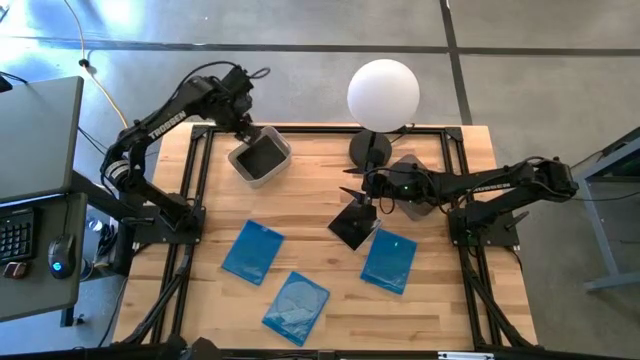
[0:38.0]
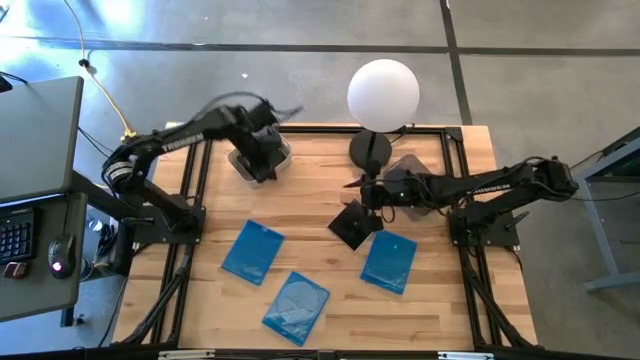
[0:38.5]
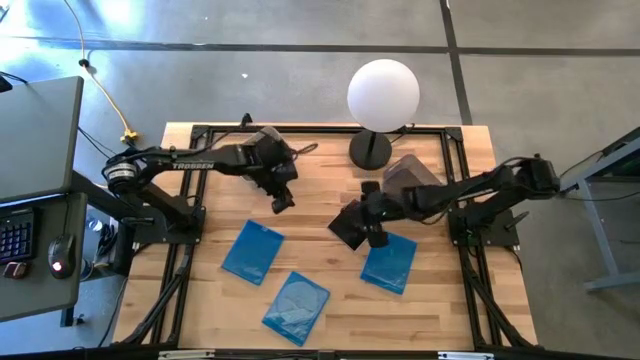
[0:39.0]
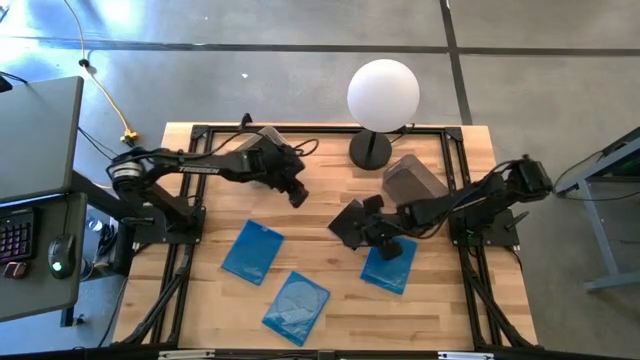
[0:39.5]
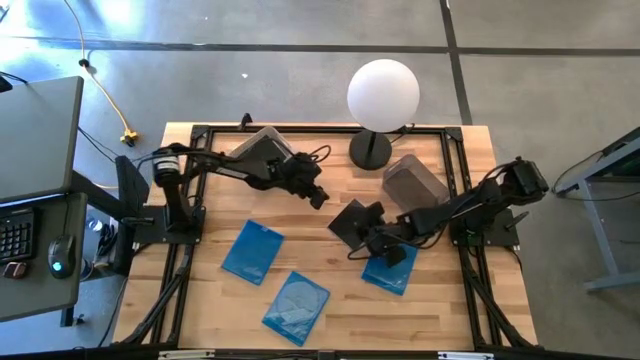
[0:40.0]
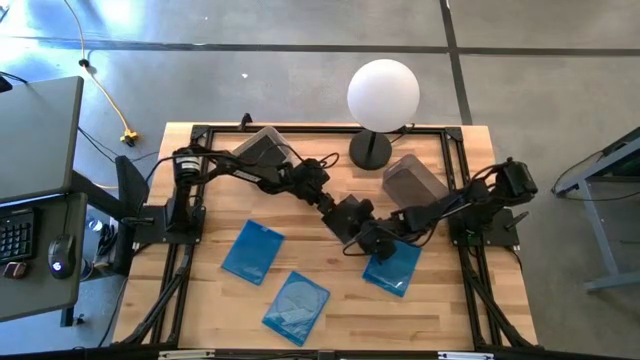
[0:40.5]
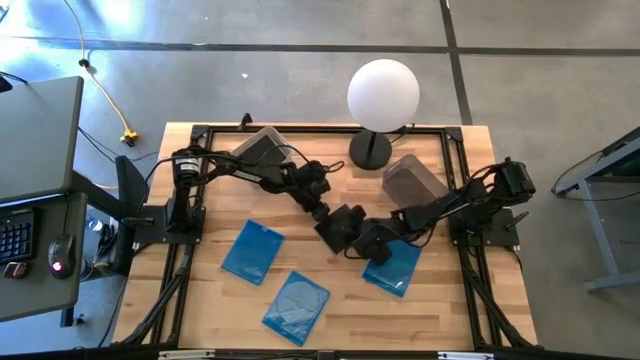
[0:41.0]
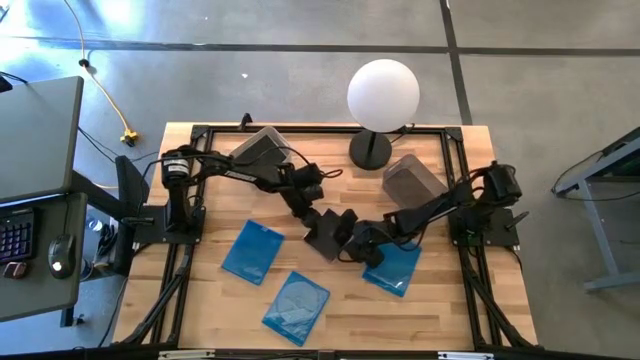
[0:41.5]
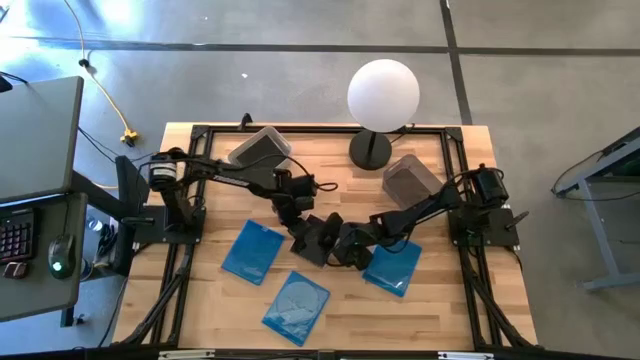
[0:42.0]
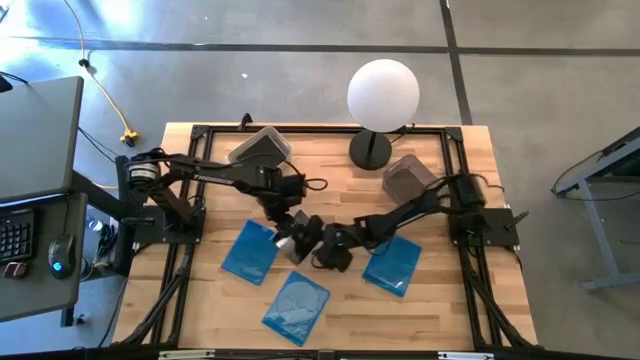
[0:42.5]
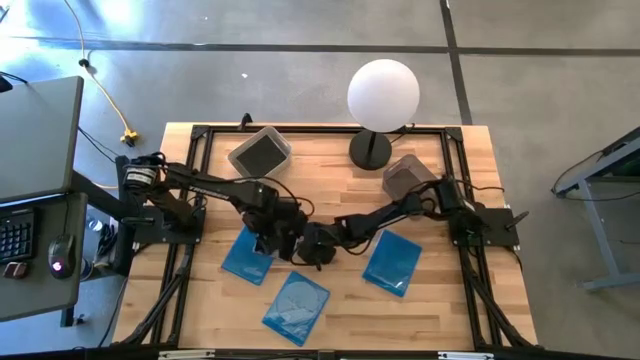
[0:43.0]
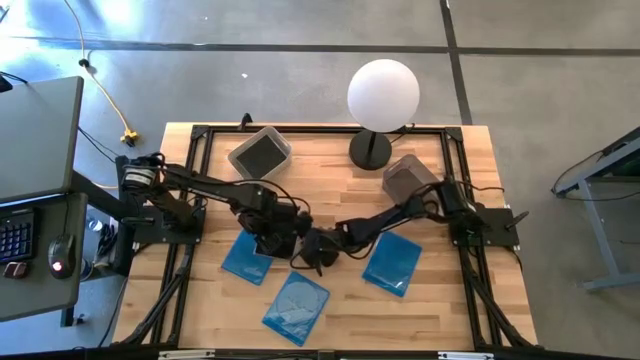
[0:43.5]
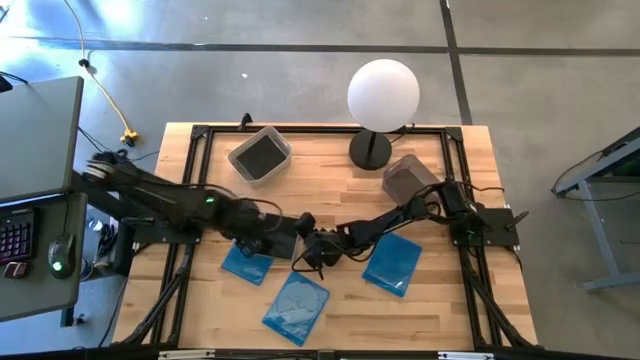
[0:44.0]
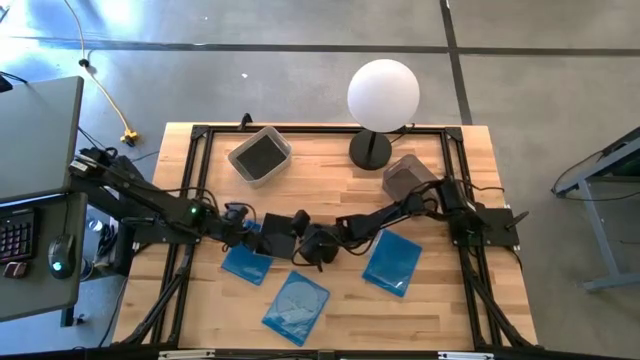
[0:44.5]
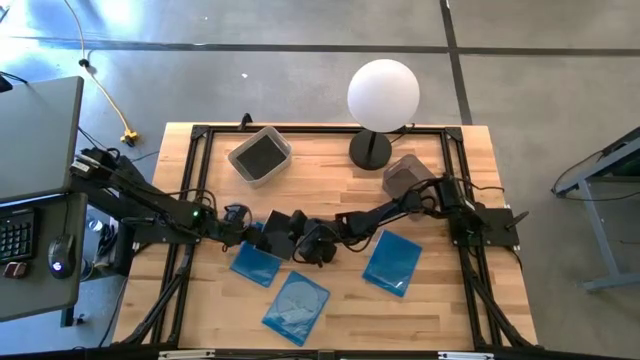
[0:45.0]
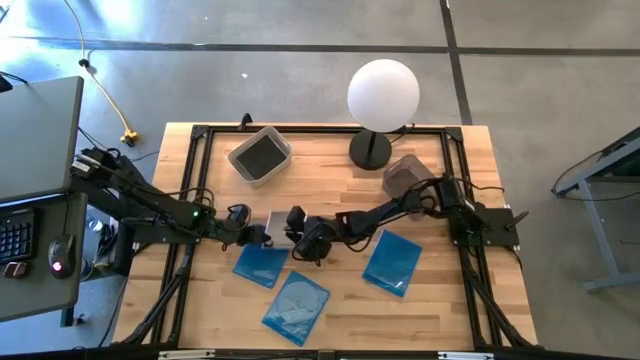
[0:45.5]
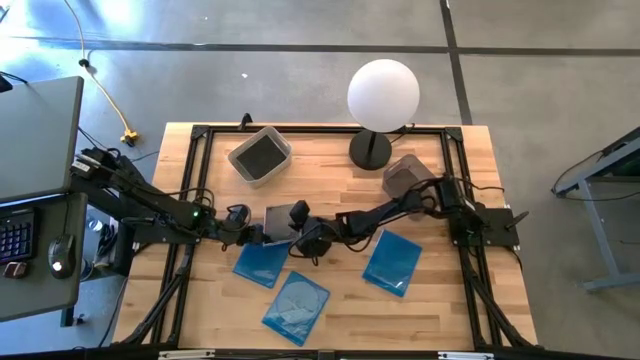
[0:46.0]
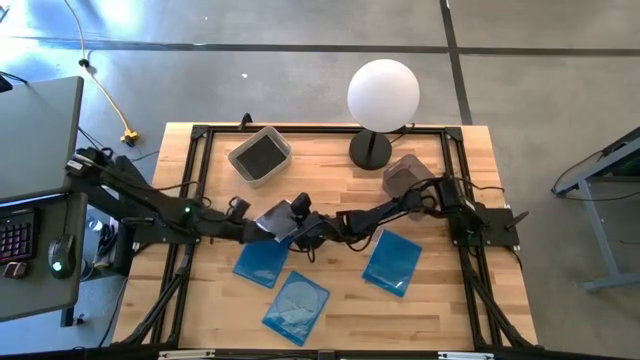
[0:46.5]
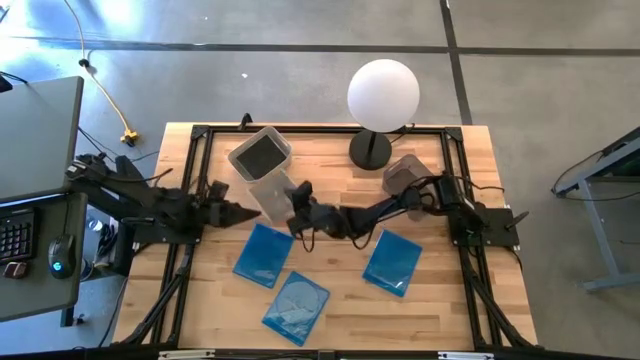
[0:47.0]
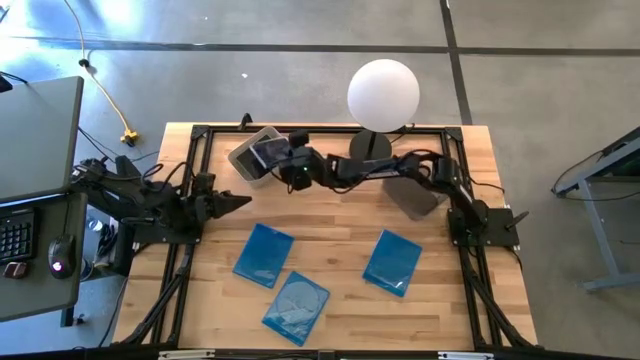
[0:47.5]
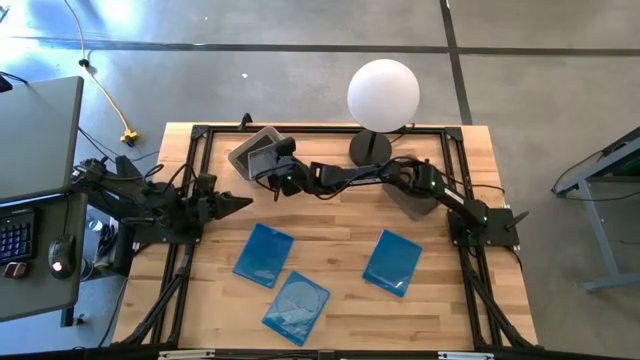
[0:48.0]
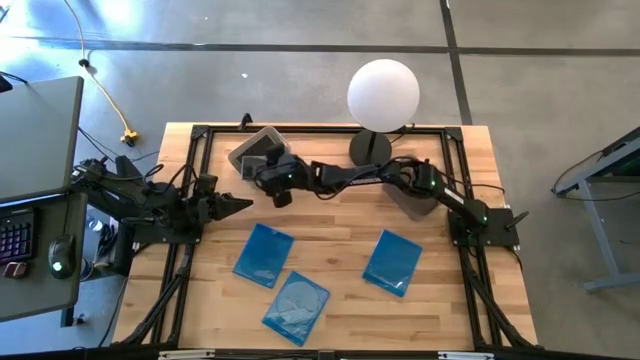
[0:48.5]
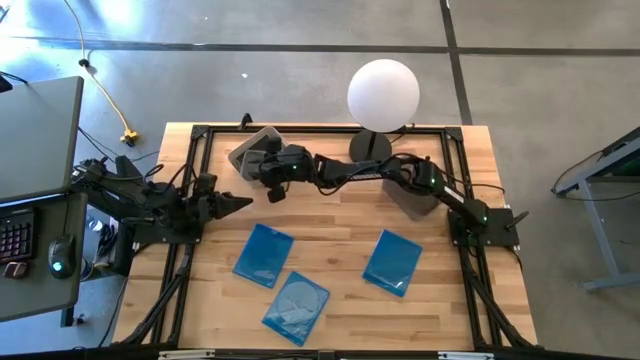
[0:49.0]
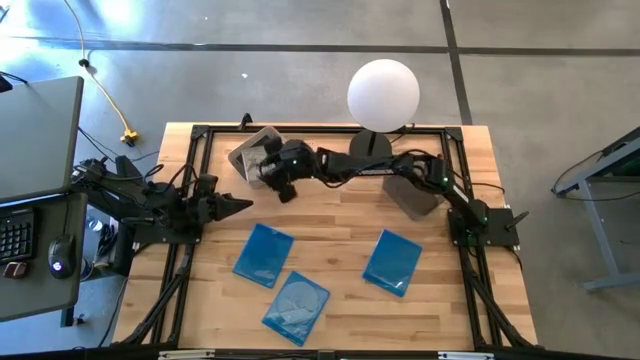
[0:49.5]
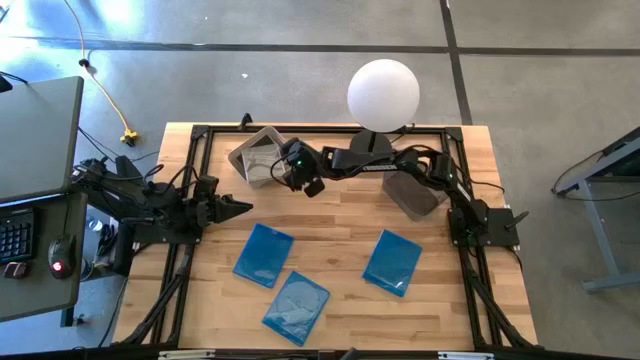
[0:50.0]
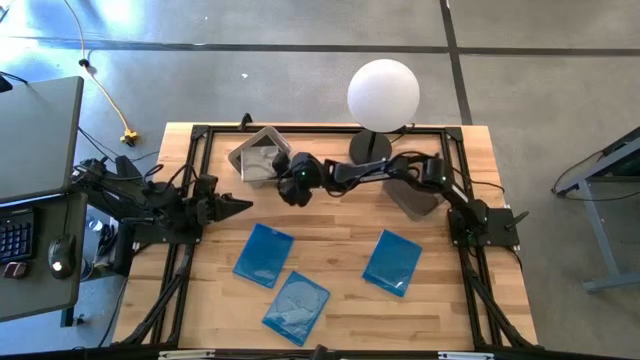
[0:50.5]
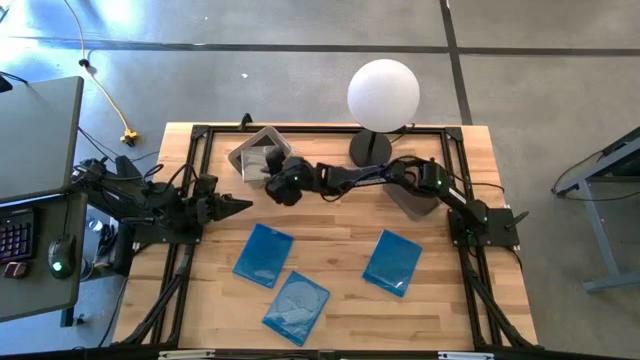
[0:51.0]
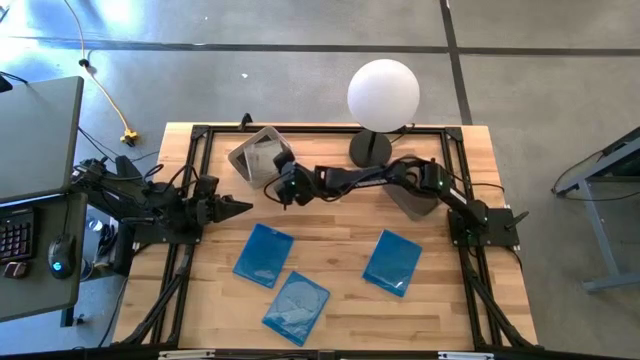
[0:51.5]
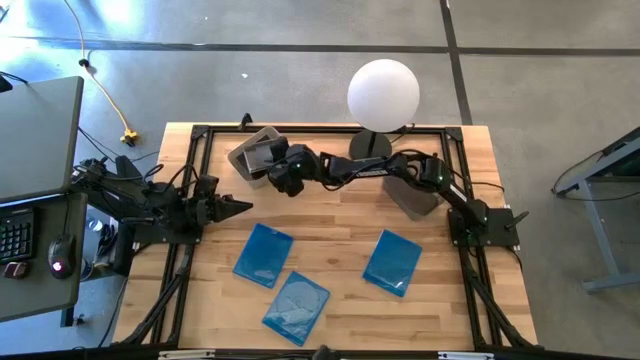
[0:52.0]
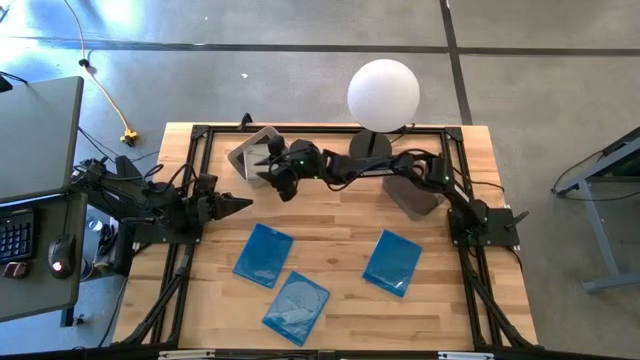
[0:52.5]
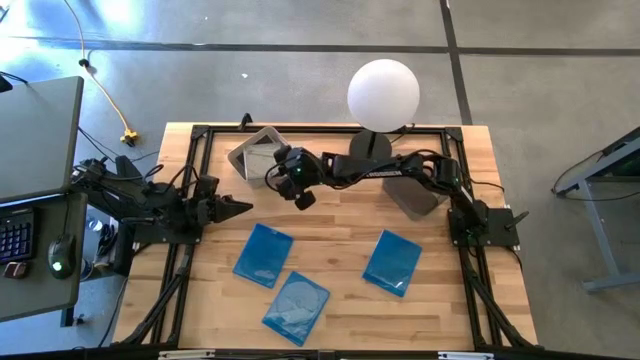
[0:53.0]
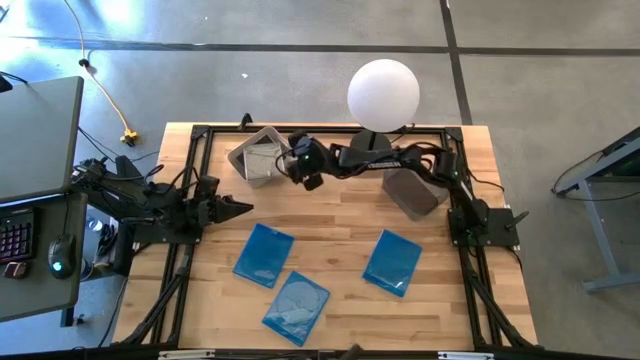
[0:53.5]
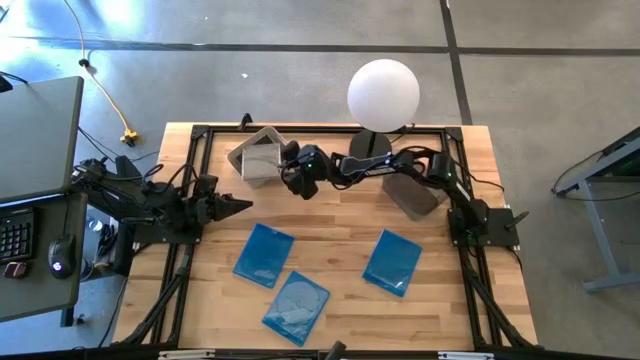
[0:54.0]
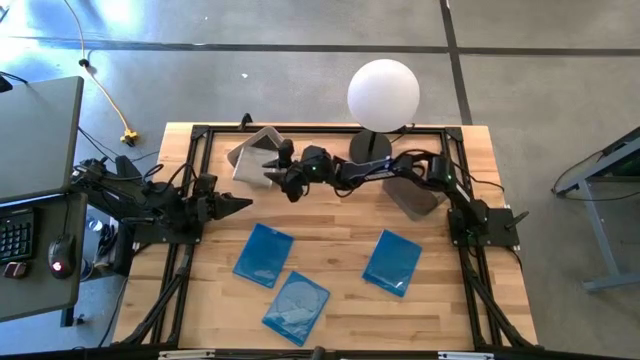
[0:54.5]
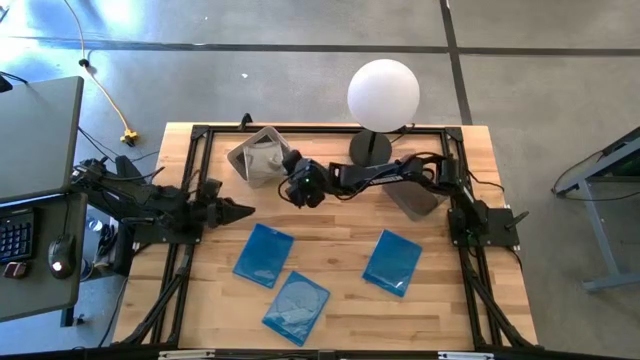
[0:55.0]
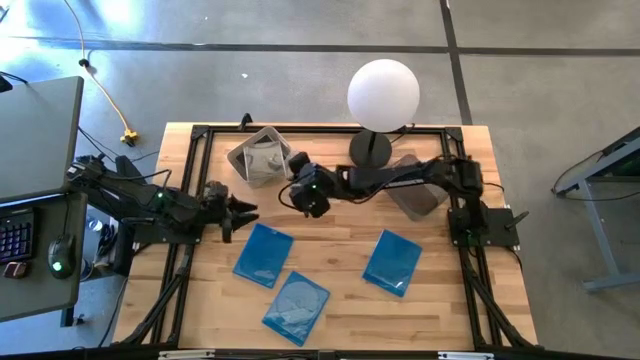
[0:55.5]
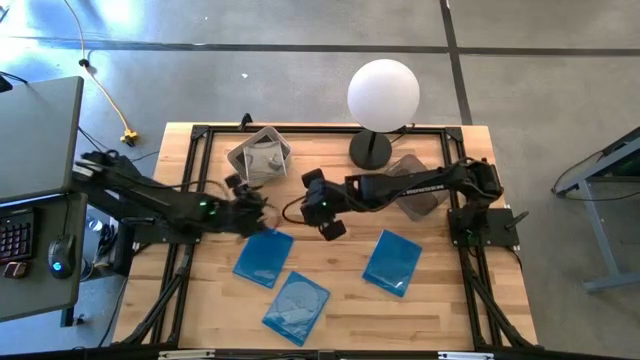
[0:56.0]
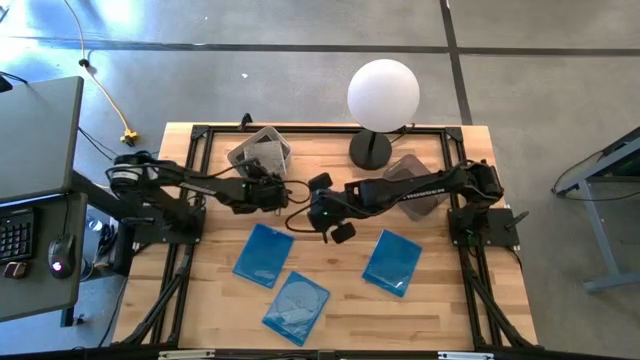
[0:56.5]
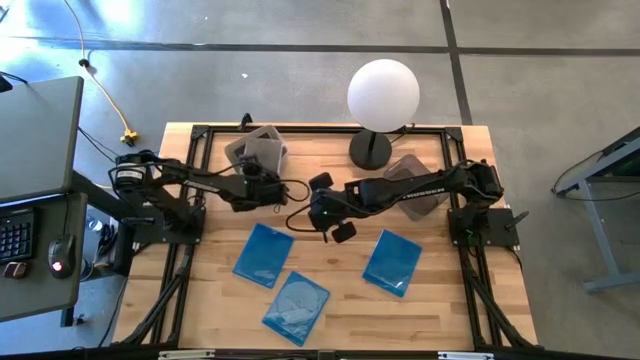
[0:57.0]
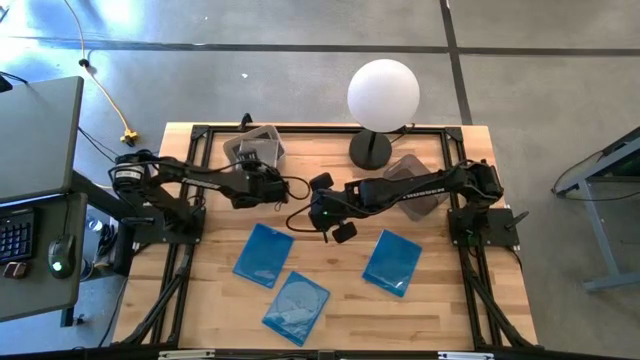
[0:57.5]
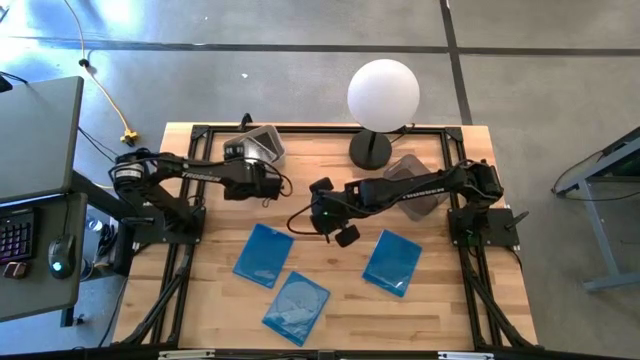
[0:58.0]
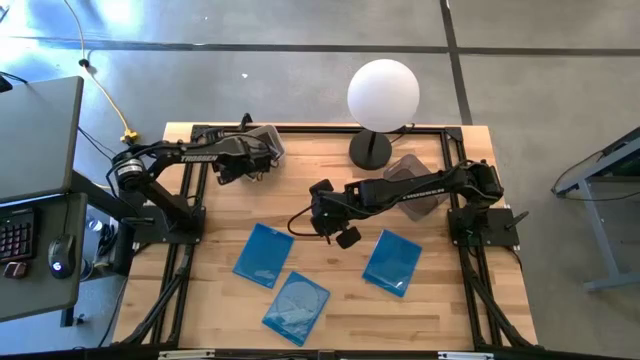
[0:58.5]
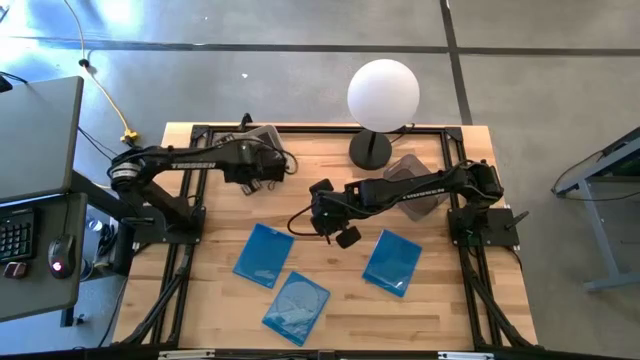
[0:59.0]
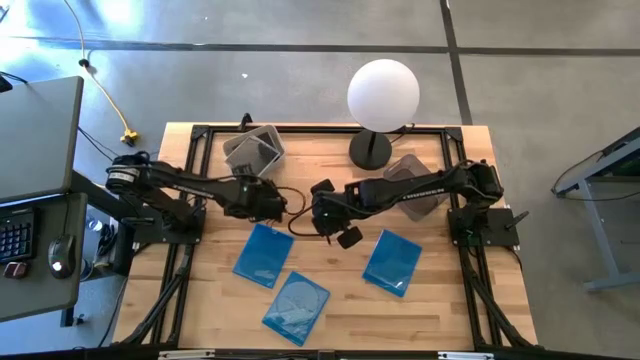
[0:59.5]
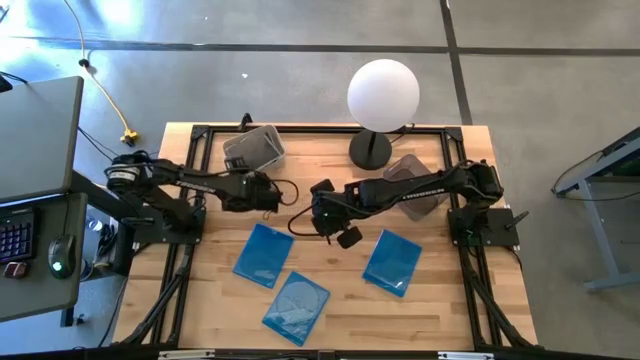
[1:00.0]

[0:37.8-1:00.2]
Task: Pick & place jewel cases by type
Put the black CD case into the white bin
